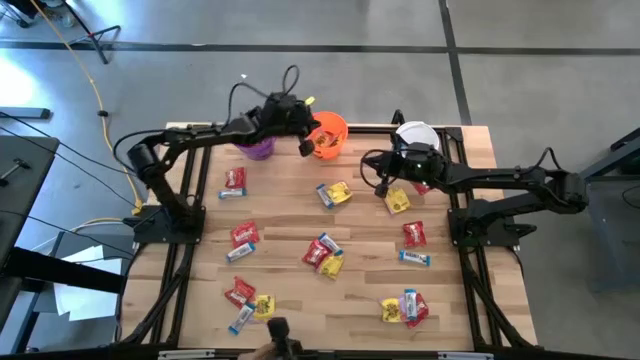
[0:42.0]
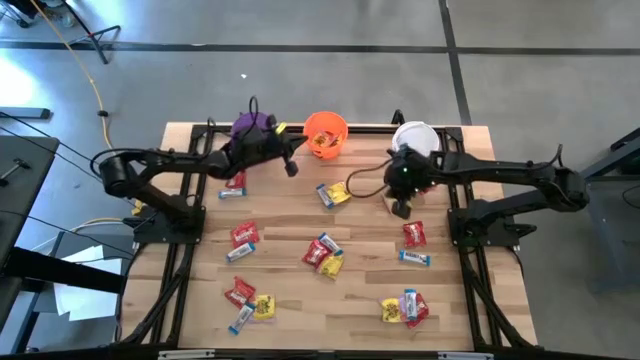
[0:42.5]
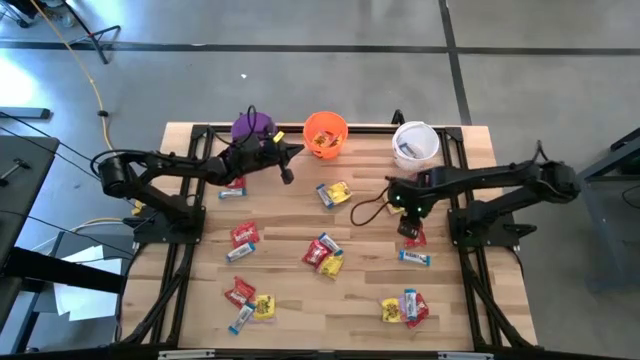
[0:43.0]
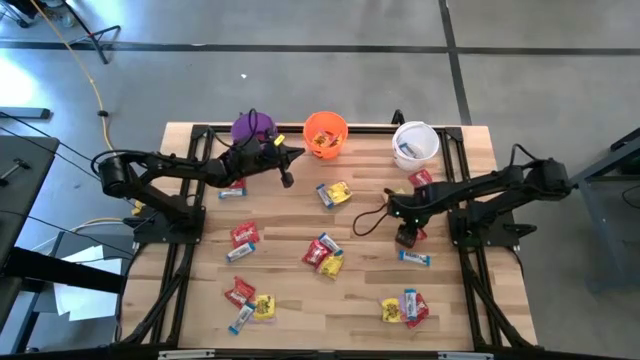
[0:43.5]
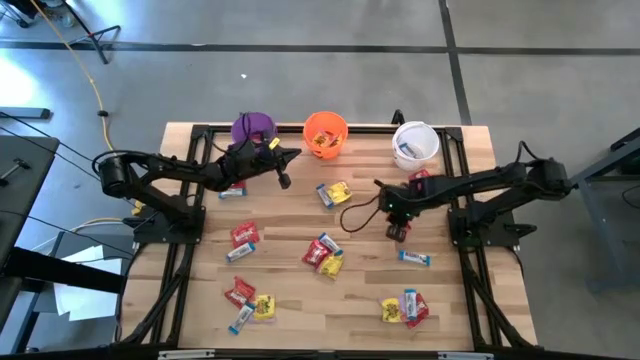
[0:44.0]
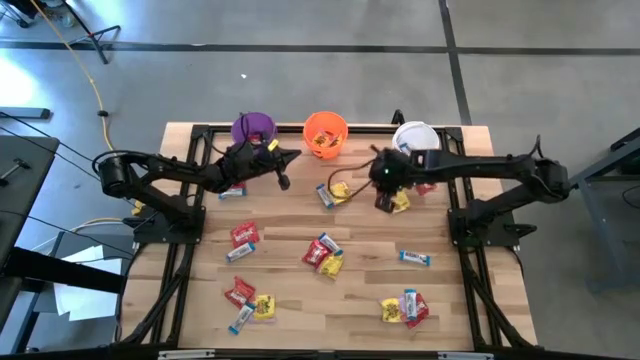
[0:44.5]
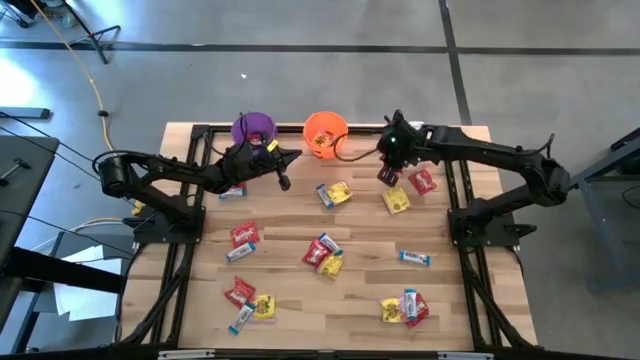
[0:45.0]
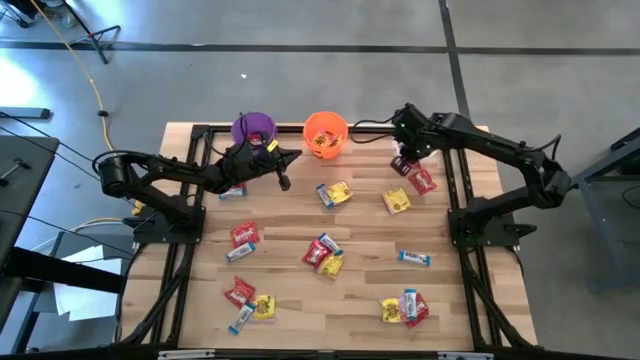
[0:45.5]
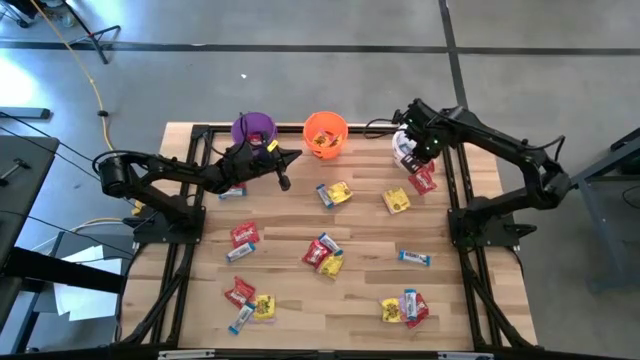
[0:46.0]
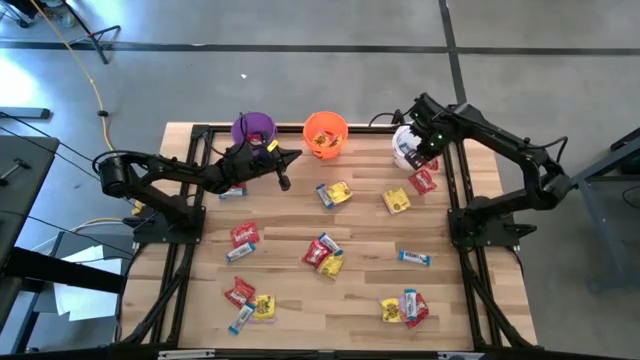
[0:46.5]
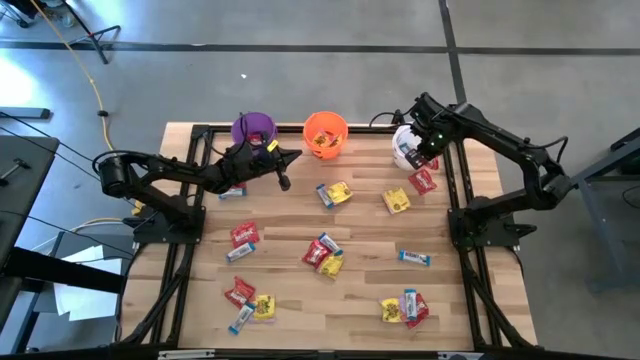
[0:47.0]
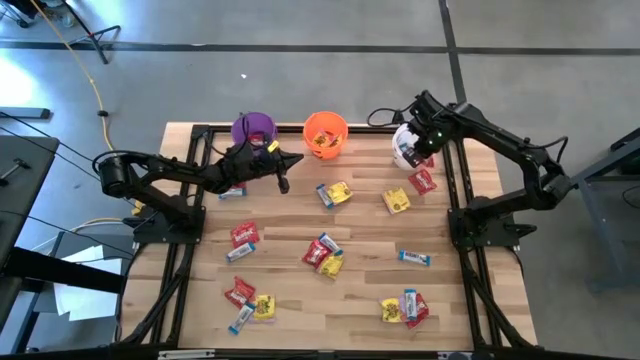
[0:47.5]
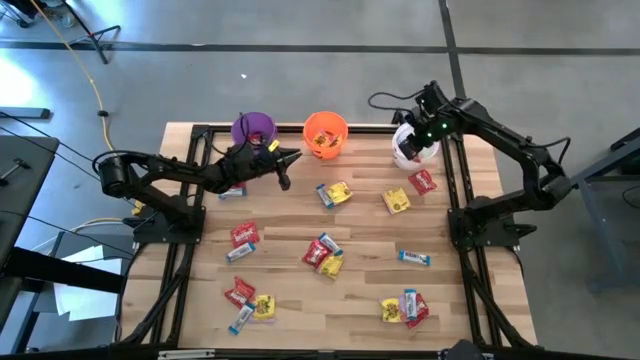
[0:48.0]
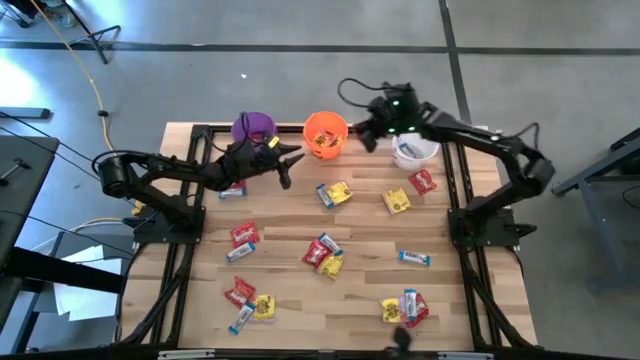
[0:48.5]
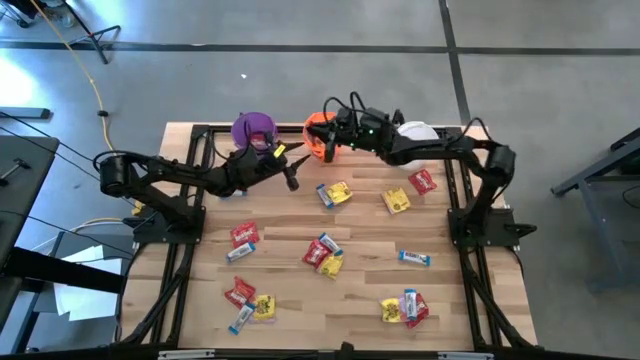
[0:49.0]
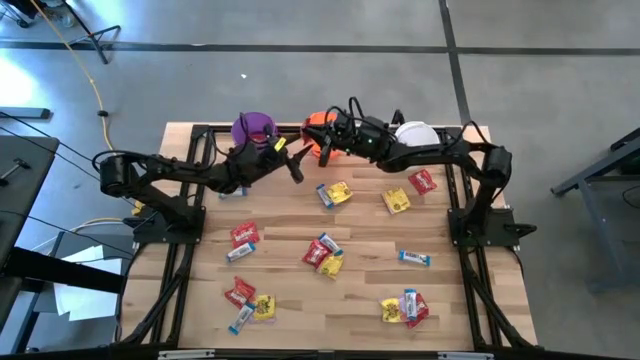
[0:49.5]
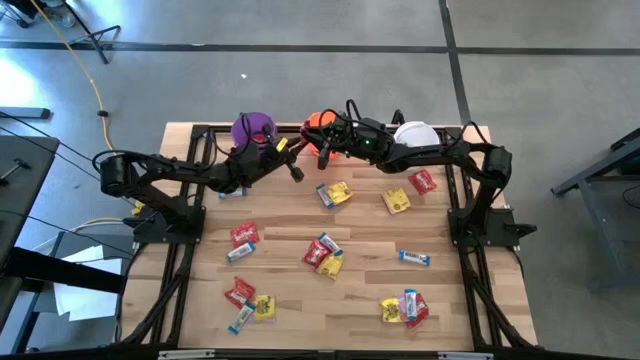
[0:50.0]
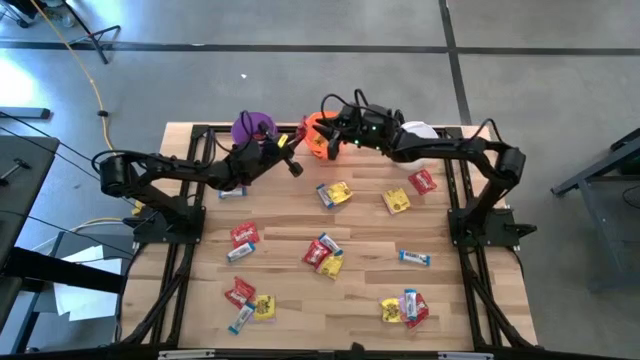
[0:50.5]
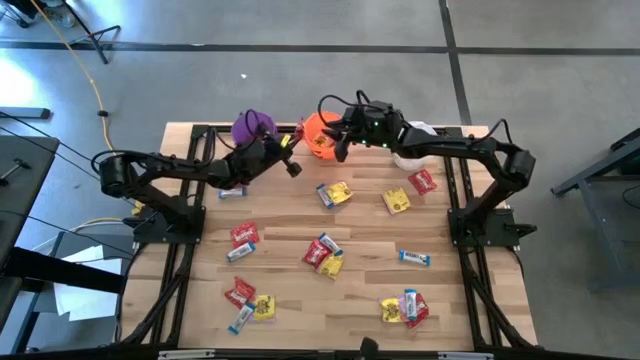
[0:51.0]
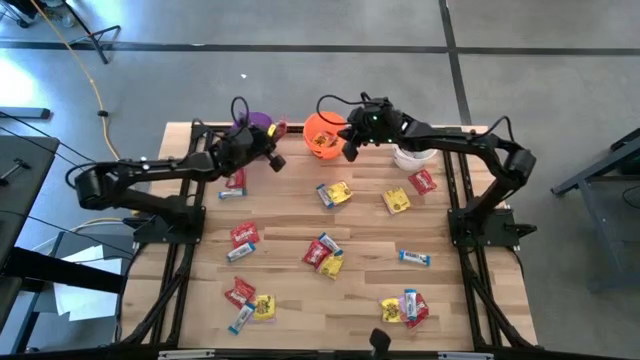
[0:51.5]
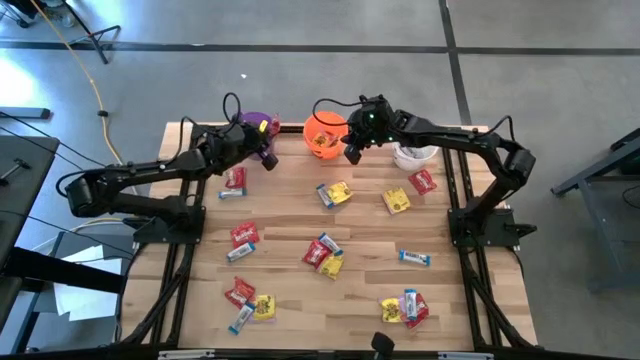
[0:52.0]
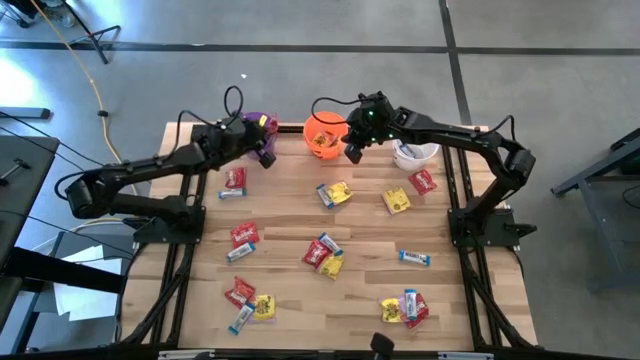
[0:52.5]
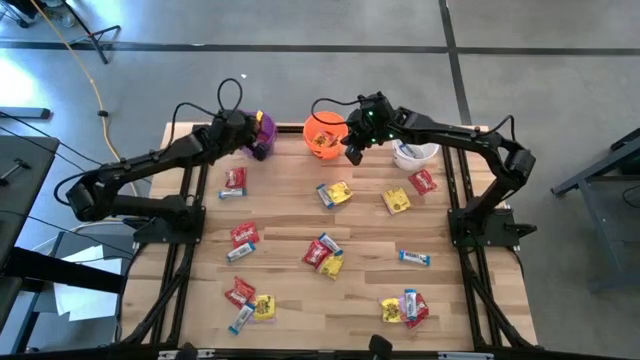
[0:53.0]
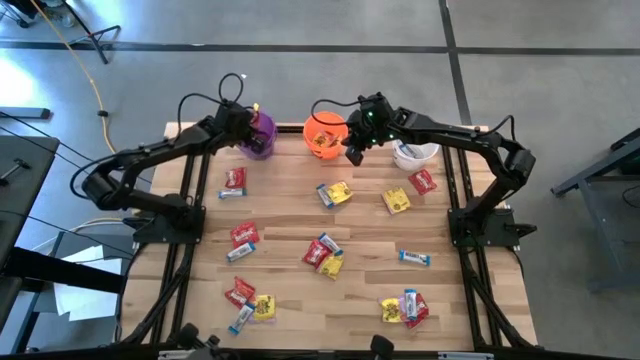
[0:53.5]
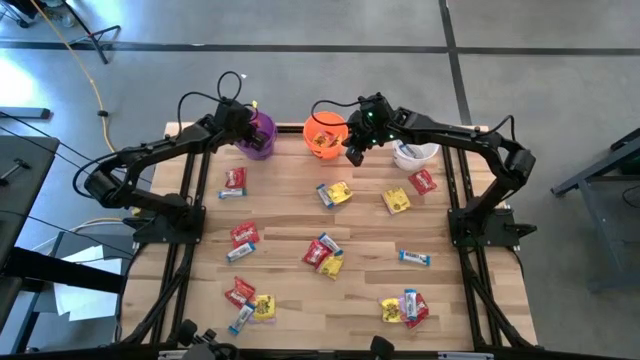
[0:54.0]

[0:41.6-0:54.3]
Task: Sort candy
Put the red candy into the violet bucket

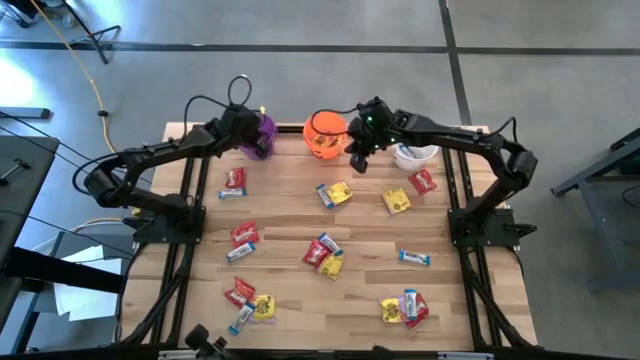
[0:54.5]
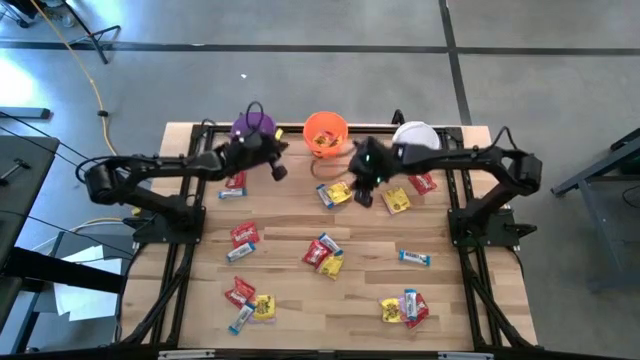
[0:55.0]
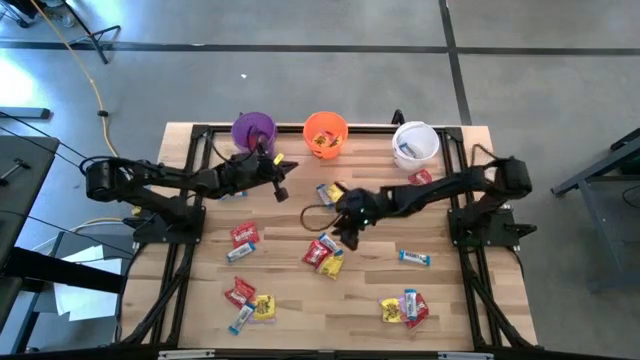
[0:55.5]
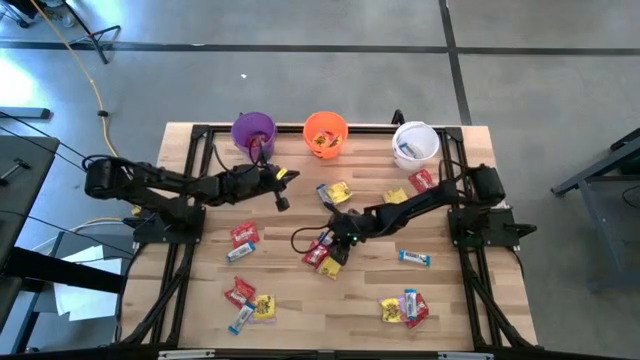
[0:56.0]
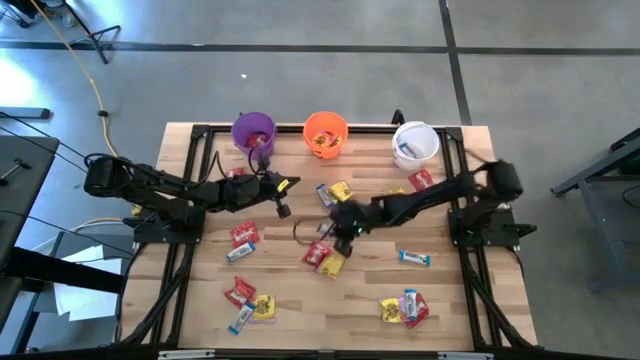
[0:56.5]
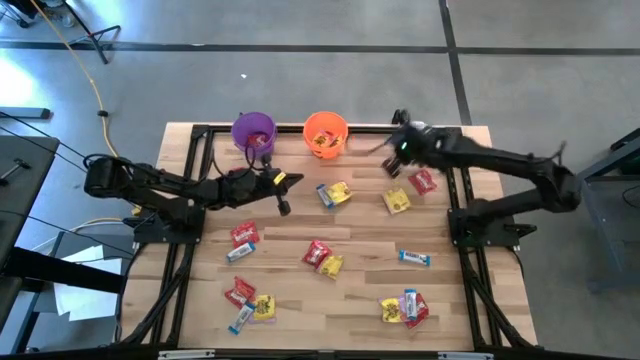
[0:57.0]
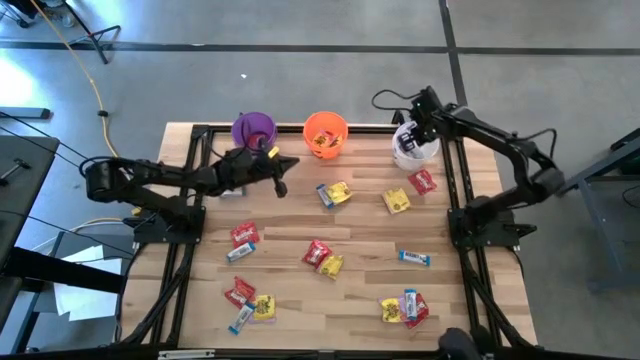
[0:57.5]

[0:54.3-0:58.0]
Put the white chocolate bar into the white bucket

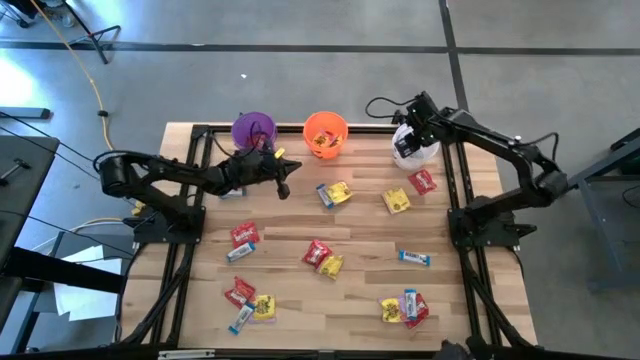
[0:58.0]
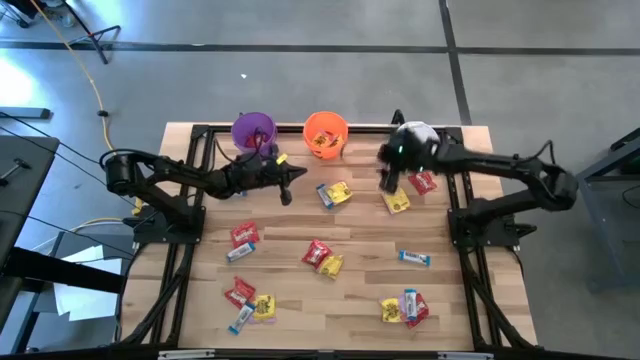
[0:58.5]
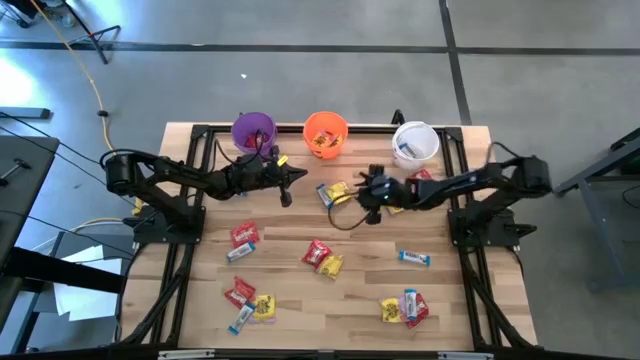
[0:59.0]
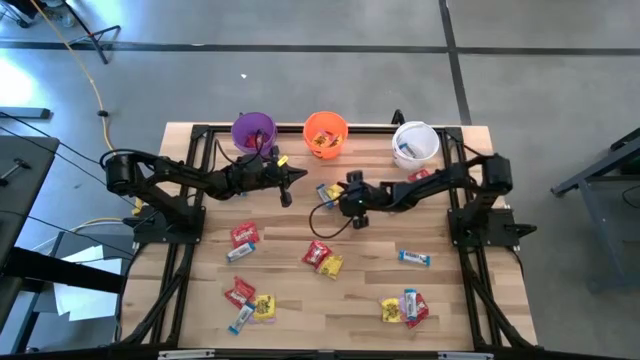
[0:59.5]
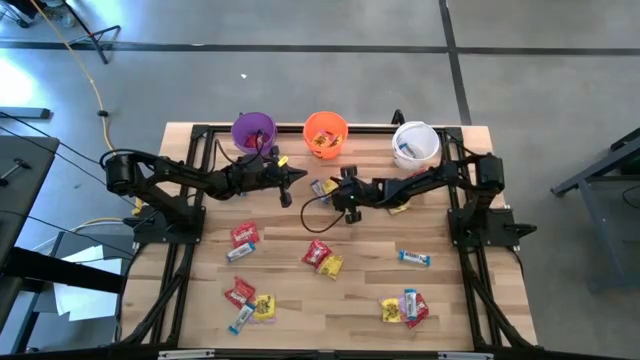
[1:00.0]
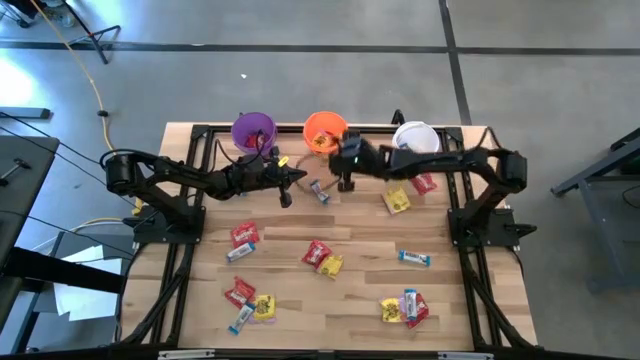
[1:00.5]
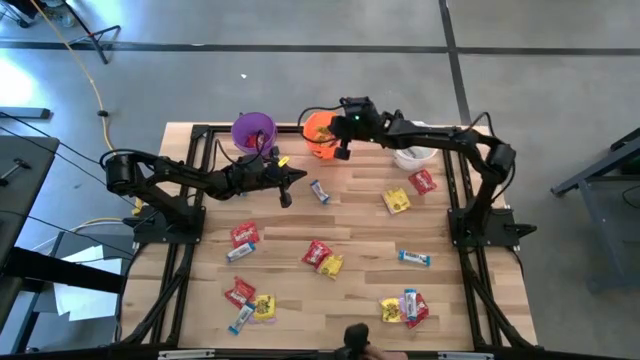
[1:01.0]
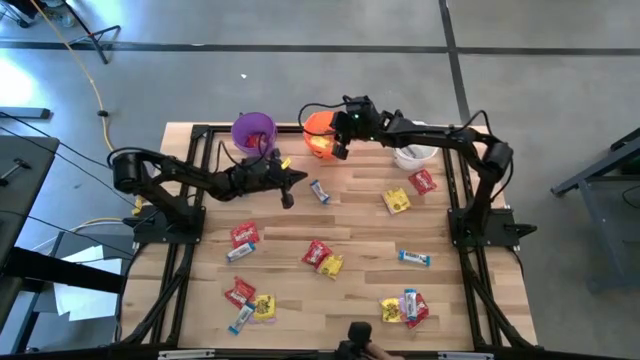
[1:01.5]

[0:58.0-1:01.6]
Put the yellow candy into the orange bucket

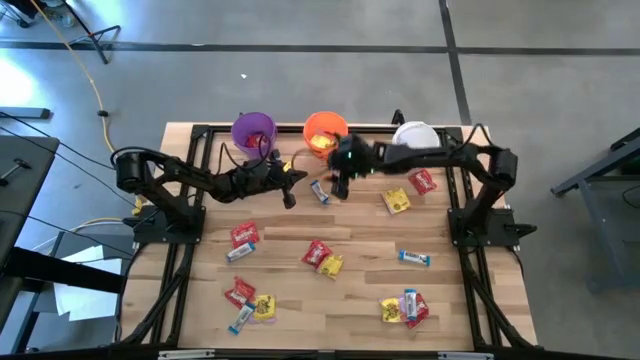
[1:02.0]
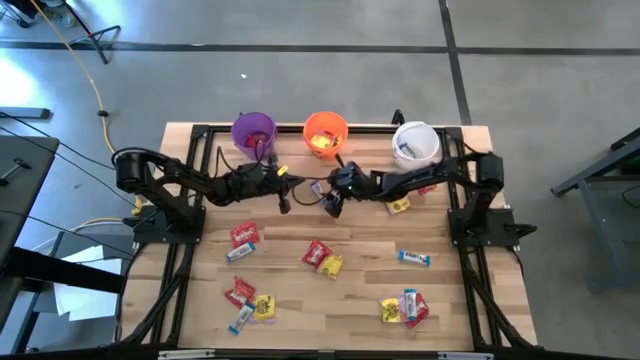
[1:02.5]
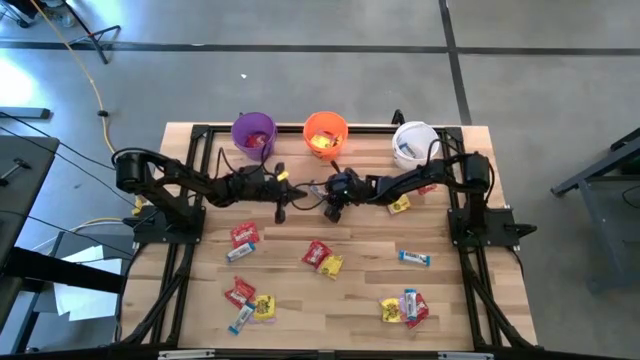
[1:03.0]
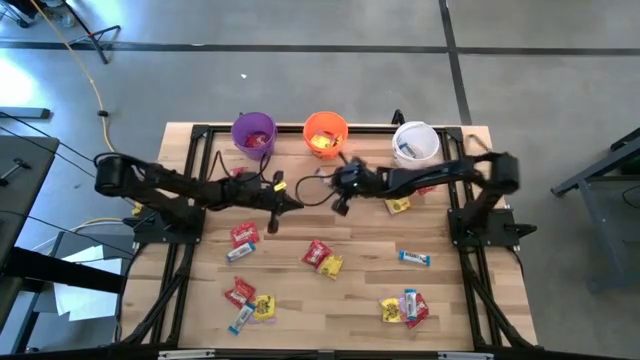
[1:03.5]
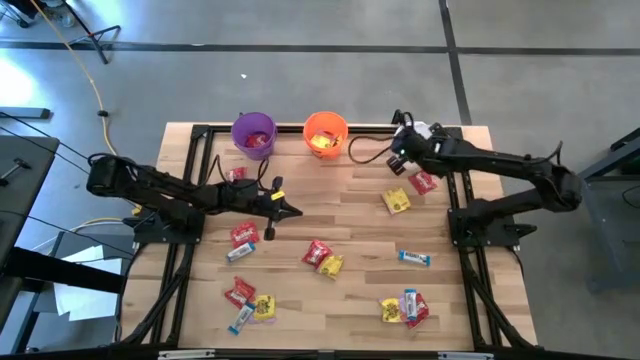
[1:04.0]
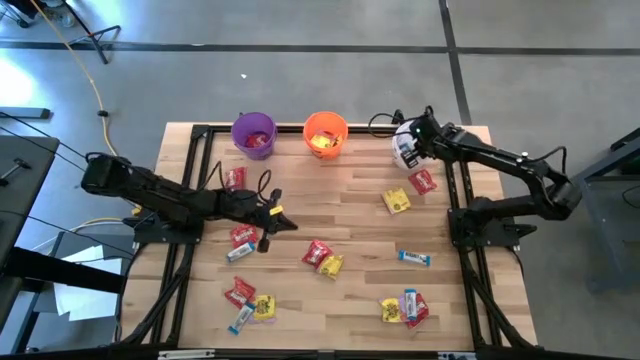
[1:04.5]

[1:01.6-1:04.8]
Put the white chocolate bar into the white bucket
